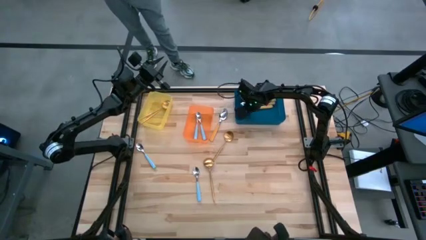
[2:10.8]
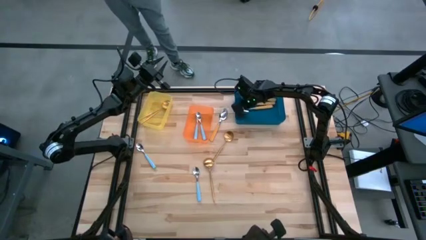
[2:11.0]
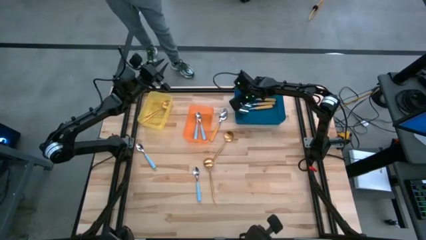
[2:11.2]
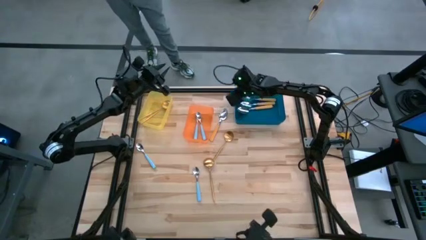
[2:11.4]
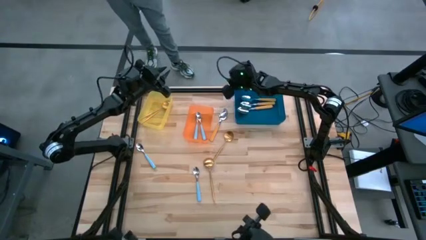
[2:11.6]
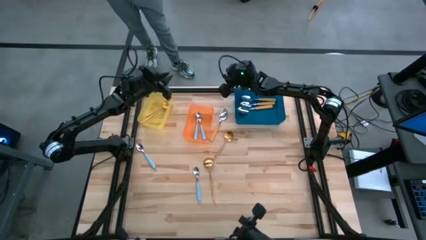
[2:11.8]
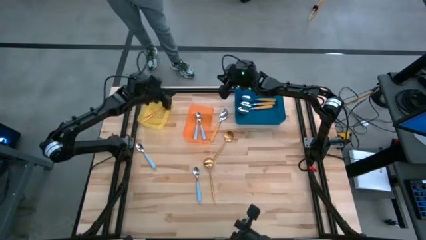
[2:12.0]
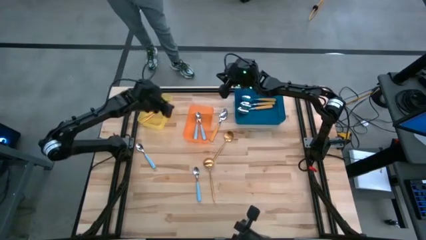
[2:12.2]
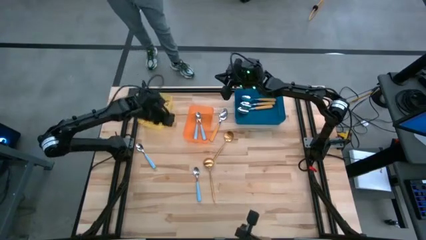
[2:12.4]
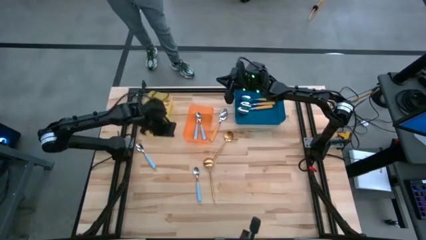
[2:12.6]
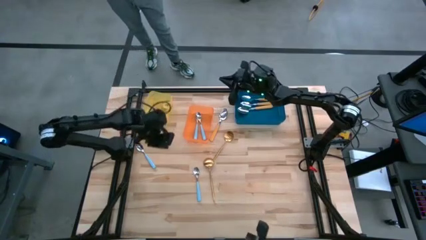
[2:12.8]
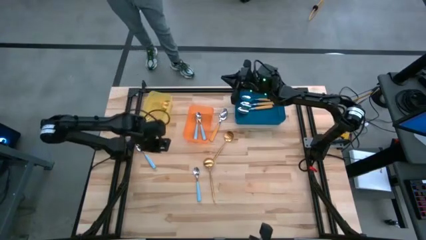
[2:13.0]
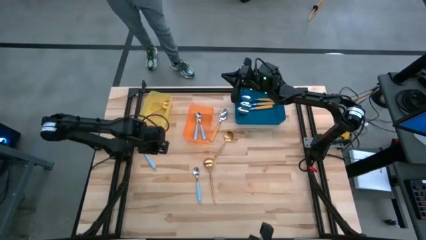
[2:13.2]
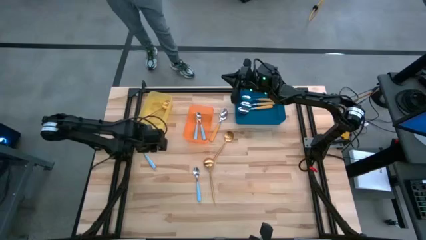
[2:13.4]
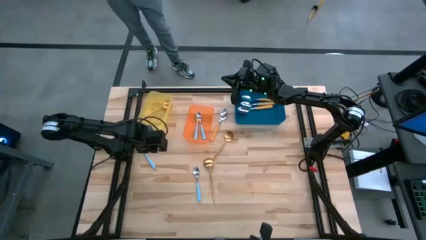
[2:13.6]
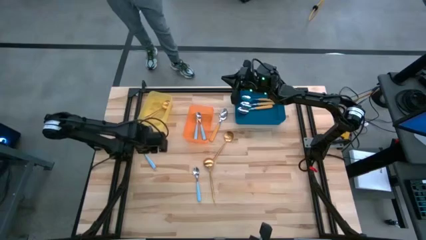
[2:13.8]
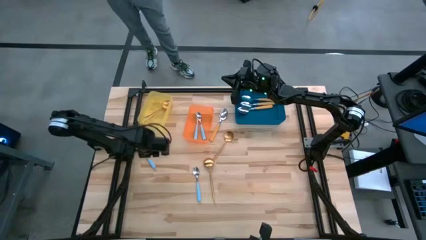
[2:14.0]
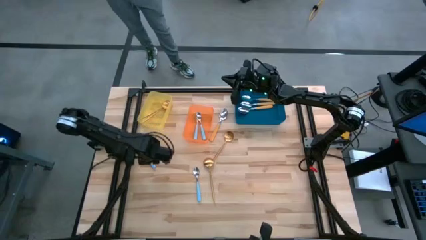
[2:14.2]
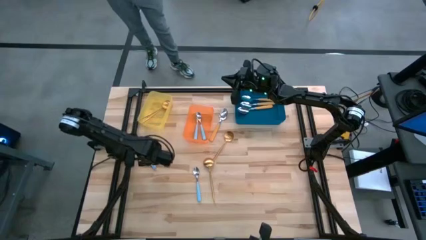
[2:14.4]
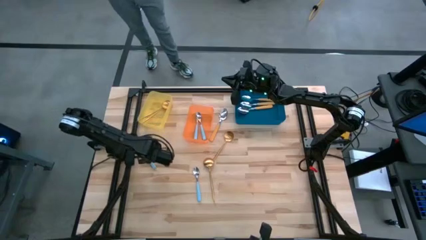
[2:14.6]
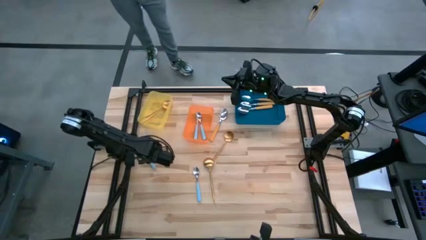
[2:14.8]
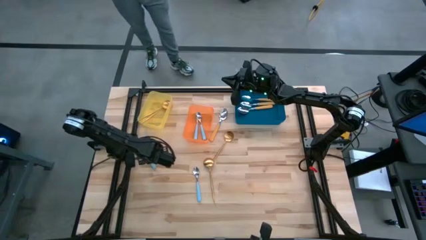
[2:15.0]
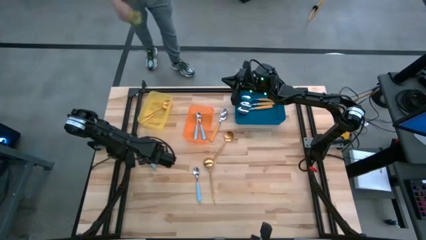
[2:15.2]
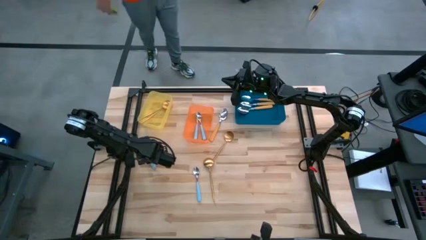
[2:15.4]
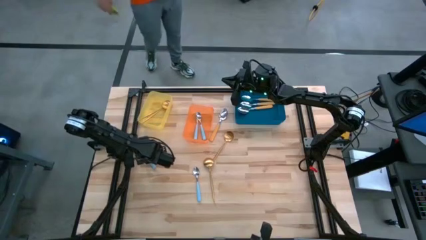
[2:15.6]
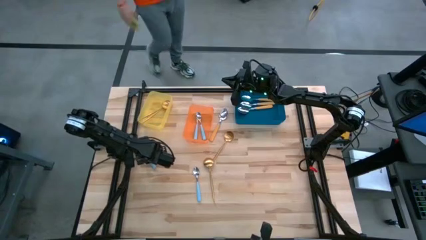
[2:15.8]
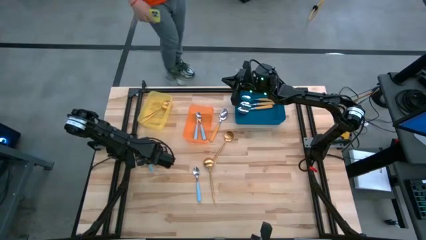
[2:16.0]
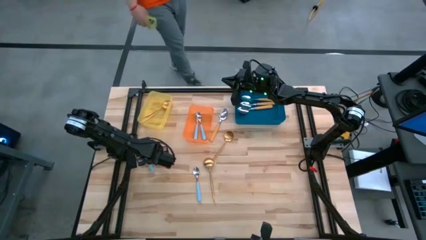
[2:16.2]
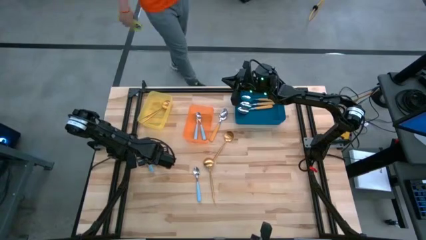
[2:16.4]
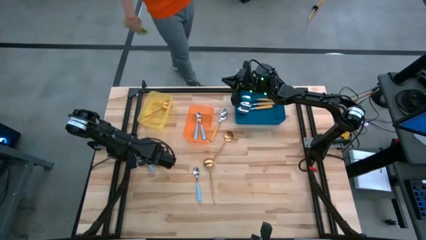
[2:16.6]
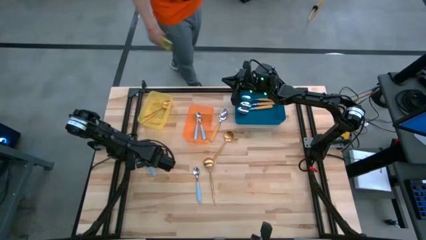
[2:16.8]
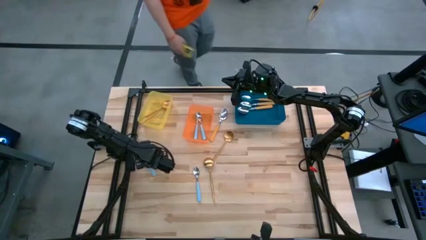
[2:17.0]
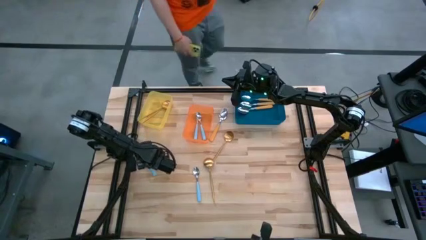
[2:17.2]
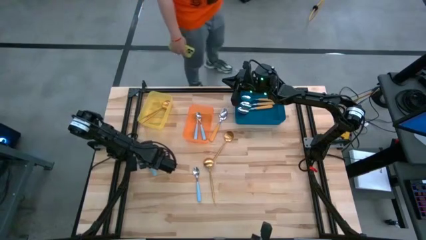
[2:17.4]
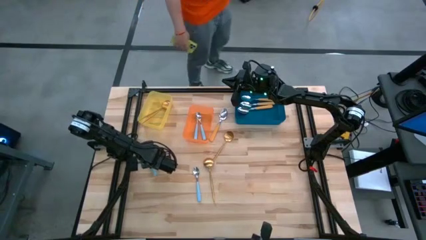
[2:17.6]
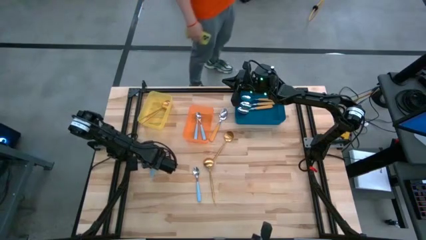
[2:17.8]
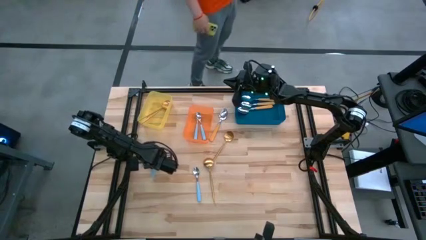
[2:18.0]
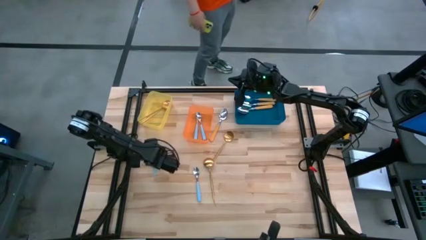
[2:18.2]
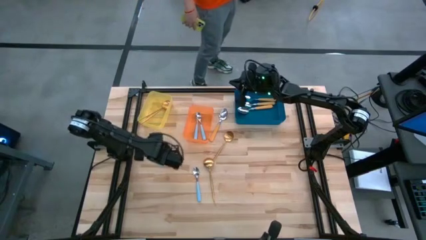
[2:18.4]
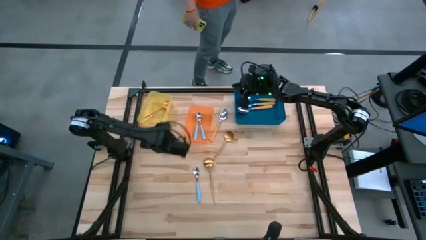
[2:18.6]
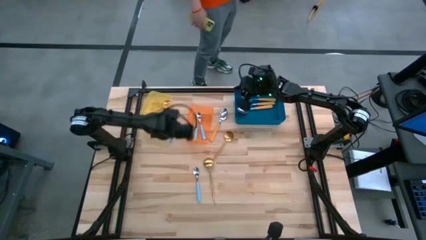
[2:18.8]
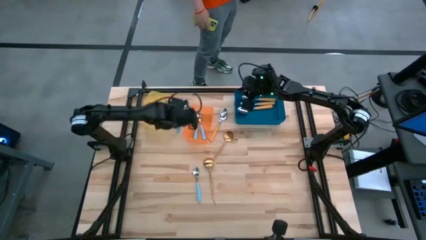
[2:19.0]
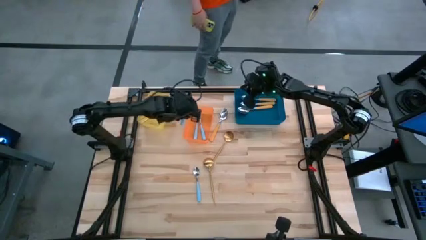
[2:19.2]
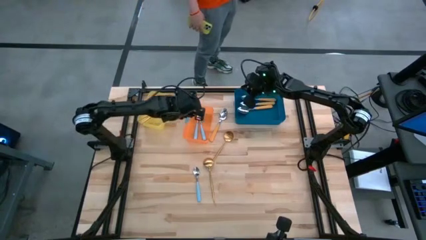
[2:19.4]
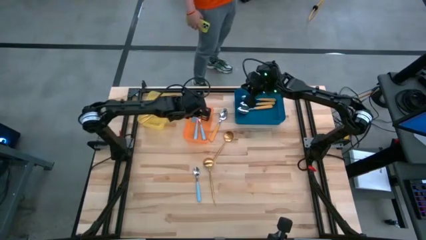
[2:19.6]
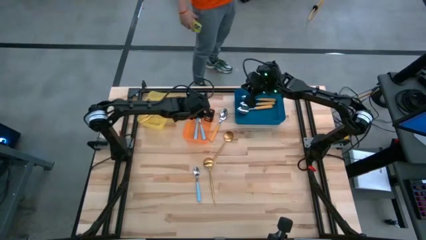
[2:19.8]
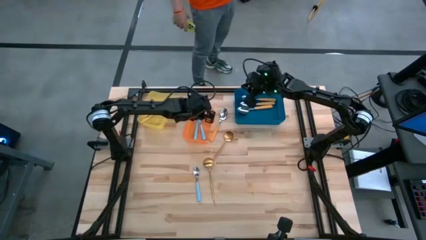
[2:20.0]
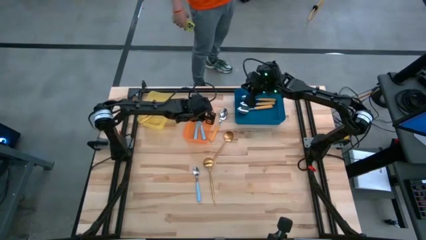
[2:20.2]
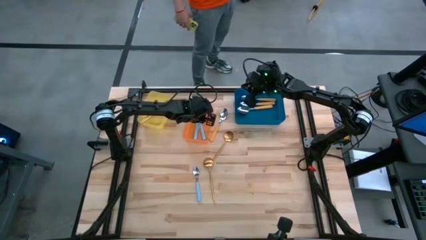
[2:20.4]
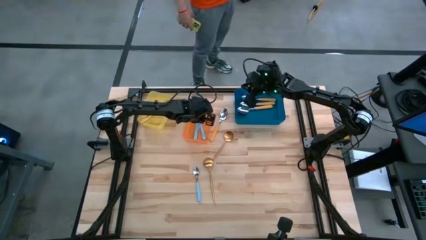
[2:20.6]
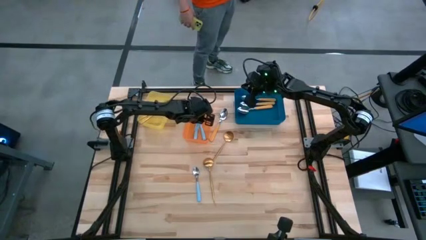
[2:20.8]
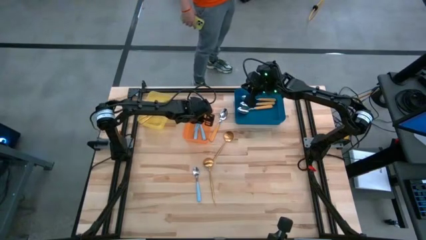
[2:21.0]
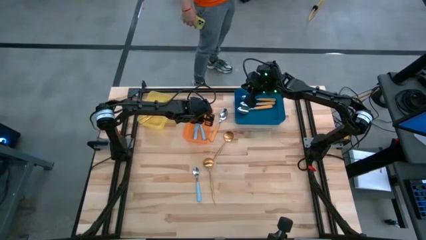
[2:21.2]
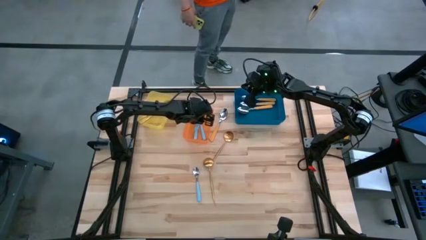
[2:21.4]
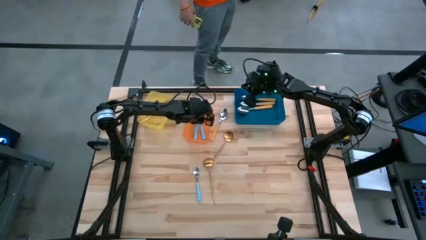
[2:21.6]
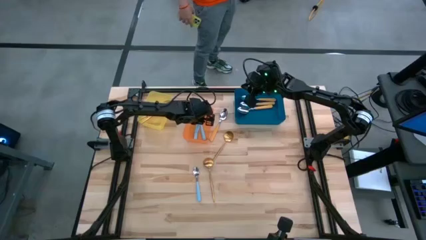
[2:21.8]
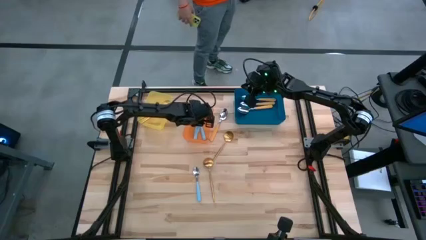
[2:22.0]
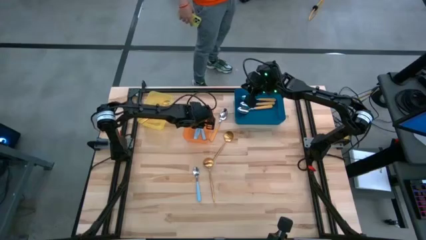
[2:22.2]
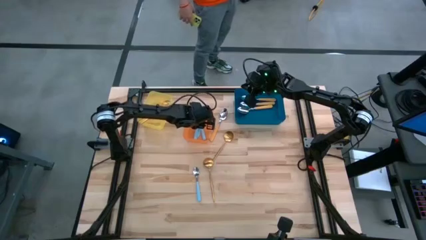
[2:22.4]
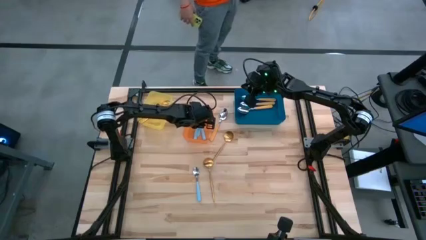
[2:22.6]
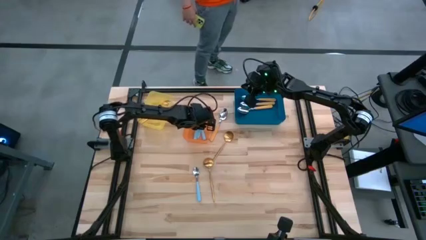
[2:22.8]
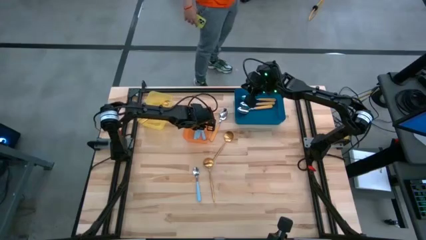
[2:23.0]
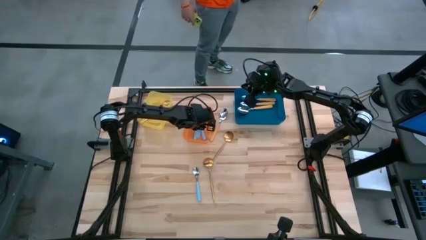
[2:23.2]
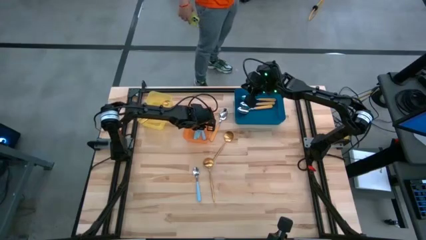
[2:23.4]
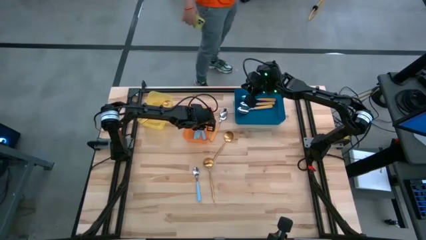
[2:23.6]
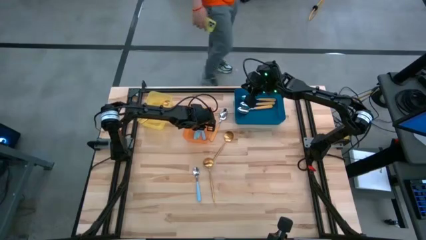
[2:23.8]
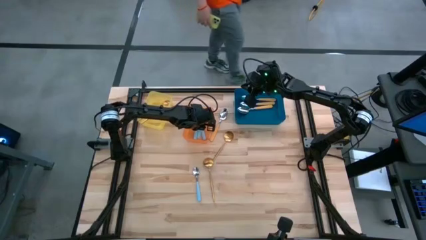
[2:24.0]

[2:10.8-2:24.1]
Task: Sort silverware by color (type)
Put the blue spoon into the orange bin
